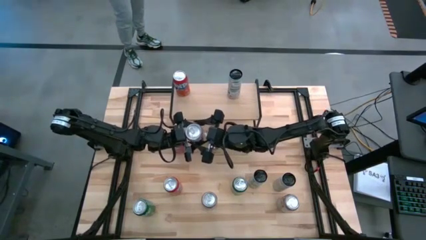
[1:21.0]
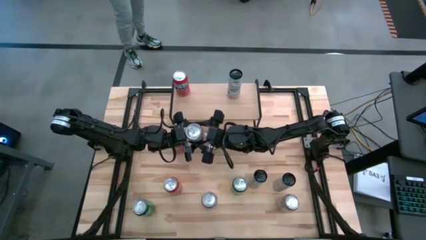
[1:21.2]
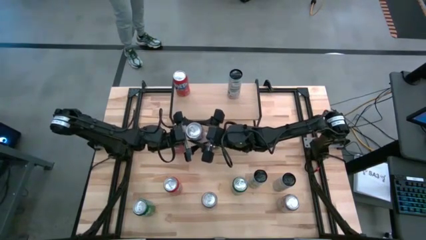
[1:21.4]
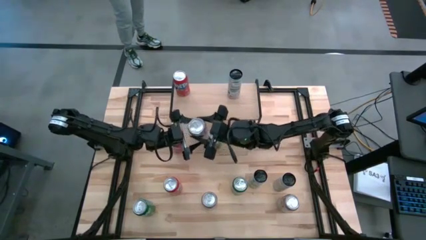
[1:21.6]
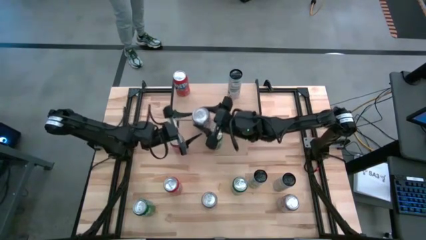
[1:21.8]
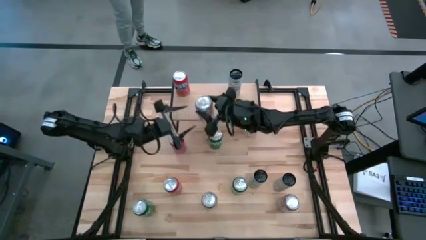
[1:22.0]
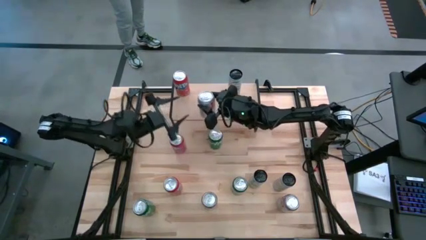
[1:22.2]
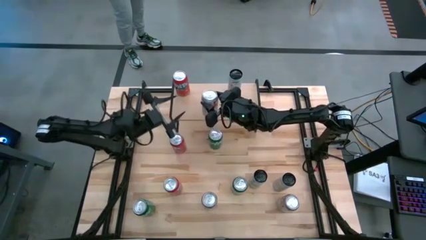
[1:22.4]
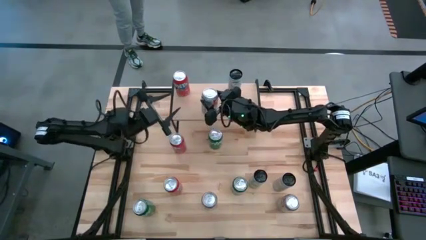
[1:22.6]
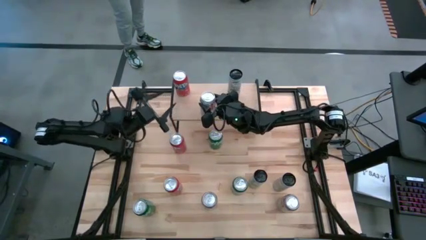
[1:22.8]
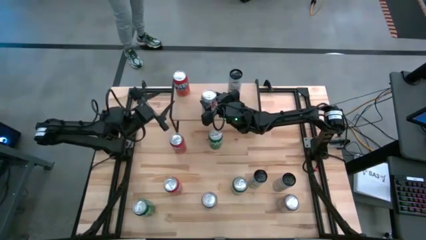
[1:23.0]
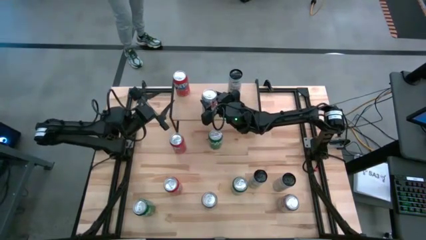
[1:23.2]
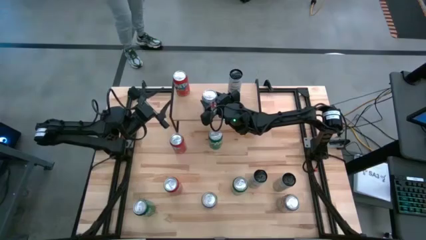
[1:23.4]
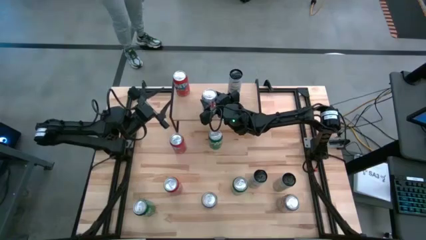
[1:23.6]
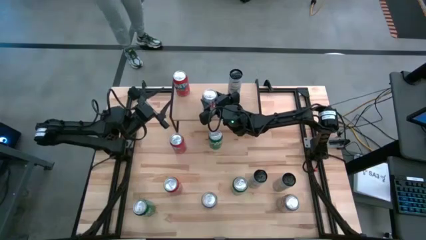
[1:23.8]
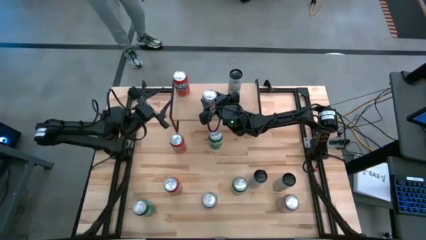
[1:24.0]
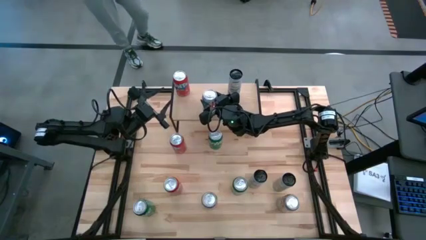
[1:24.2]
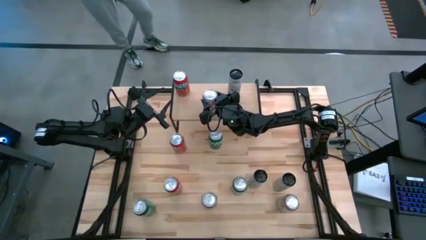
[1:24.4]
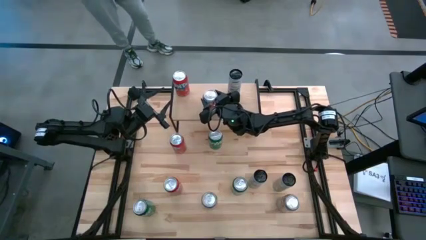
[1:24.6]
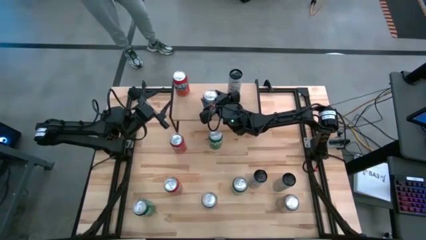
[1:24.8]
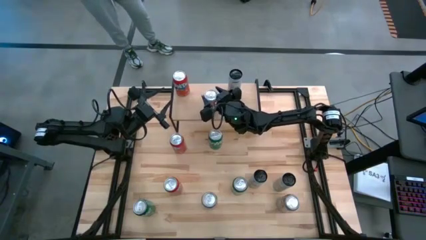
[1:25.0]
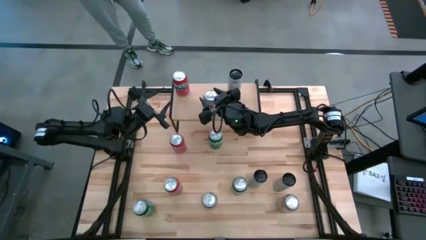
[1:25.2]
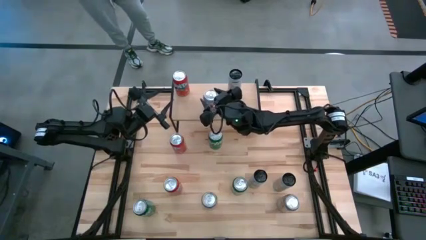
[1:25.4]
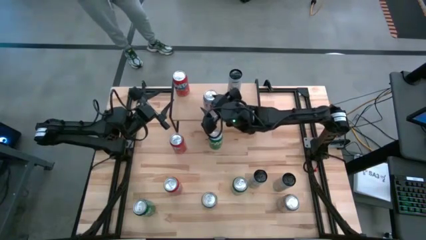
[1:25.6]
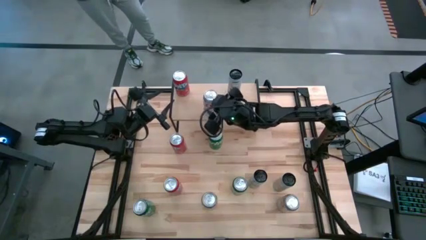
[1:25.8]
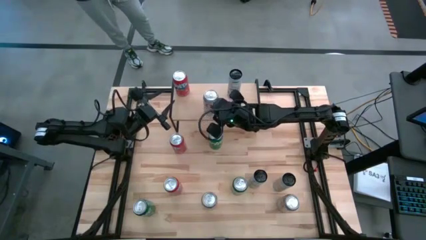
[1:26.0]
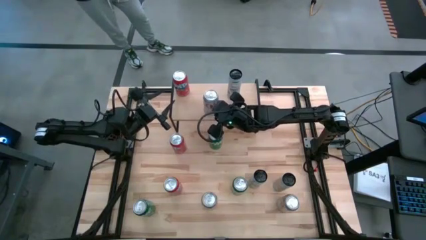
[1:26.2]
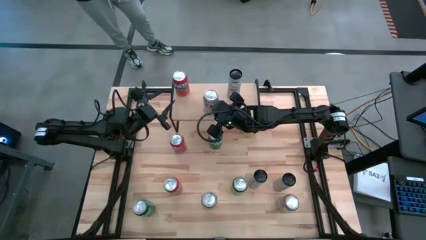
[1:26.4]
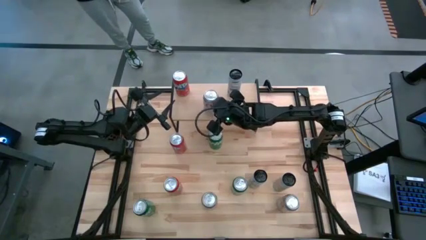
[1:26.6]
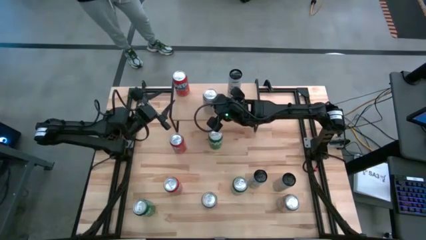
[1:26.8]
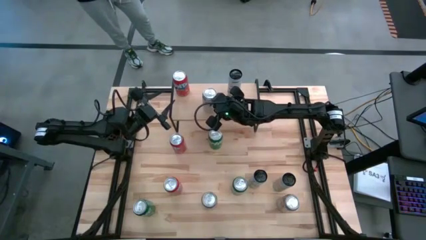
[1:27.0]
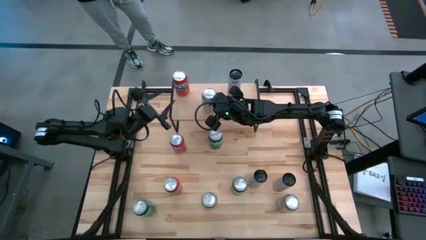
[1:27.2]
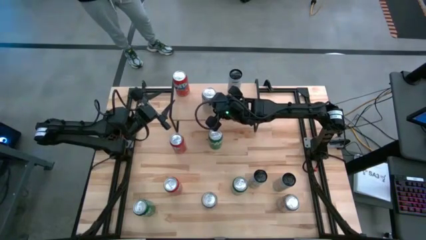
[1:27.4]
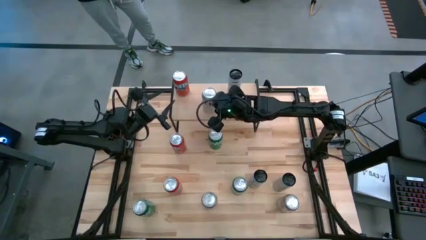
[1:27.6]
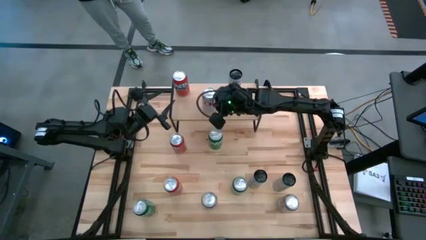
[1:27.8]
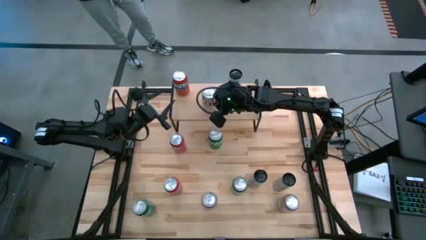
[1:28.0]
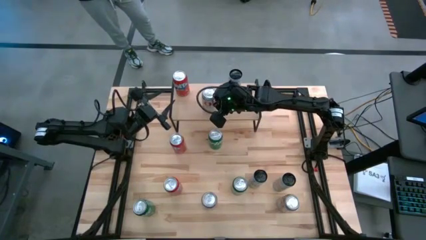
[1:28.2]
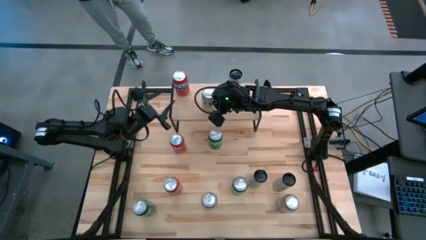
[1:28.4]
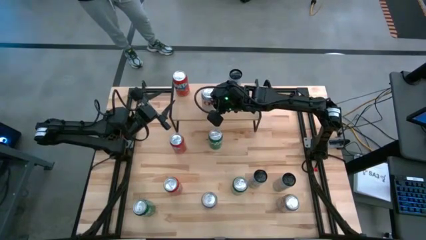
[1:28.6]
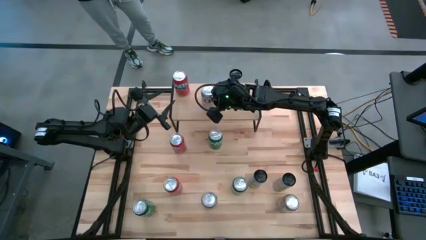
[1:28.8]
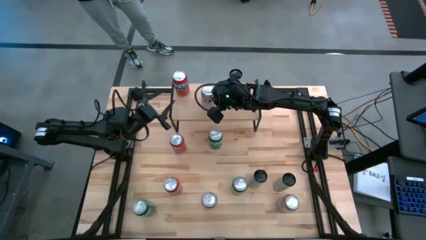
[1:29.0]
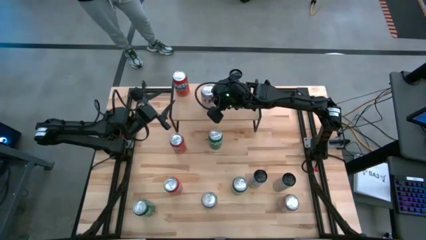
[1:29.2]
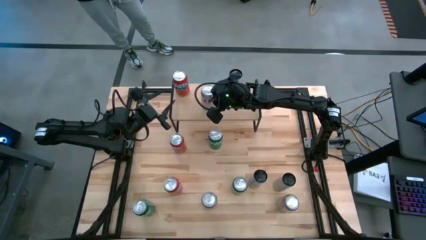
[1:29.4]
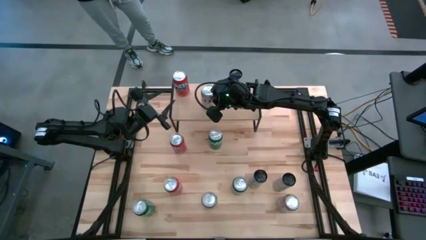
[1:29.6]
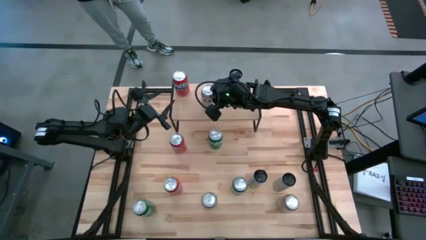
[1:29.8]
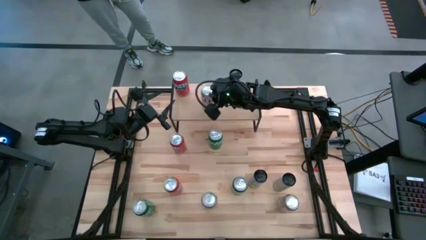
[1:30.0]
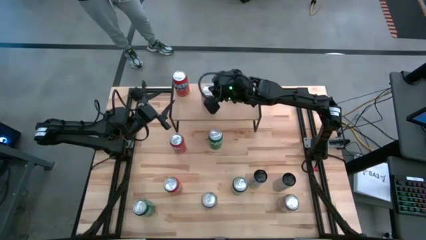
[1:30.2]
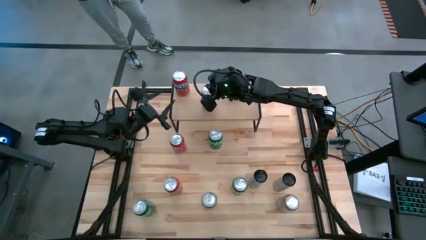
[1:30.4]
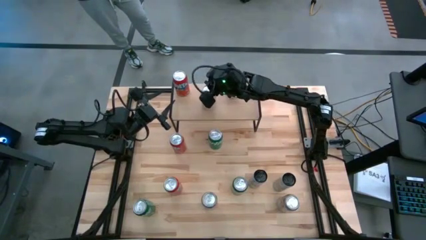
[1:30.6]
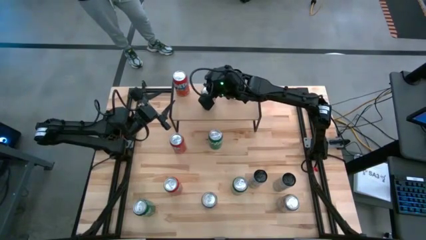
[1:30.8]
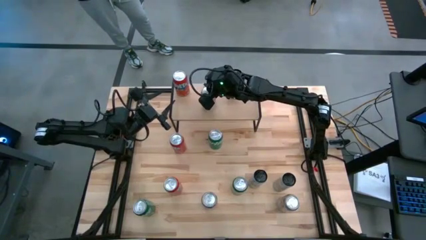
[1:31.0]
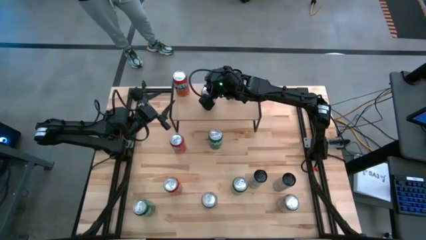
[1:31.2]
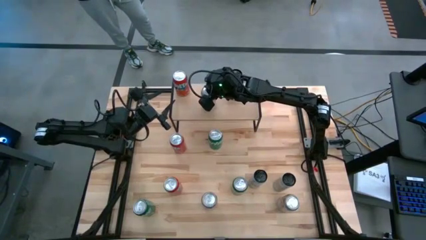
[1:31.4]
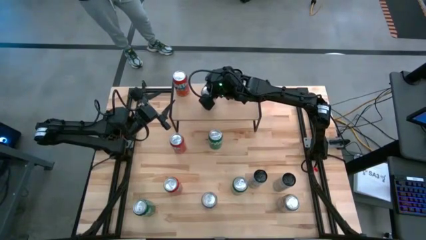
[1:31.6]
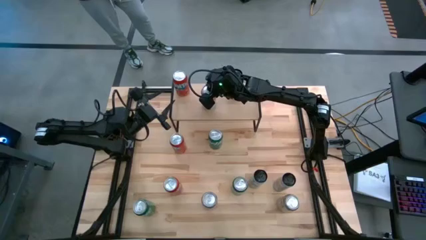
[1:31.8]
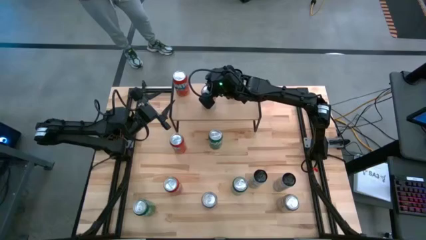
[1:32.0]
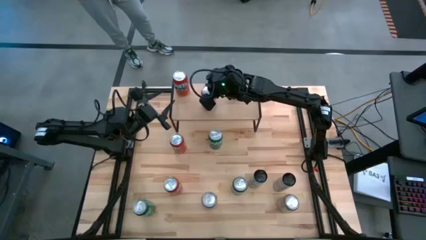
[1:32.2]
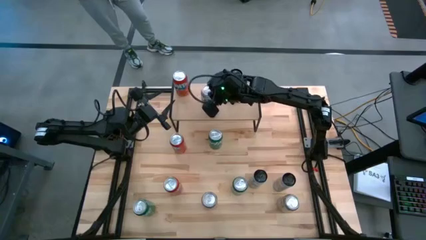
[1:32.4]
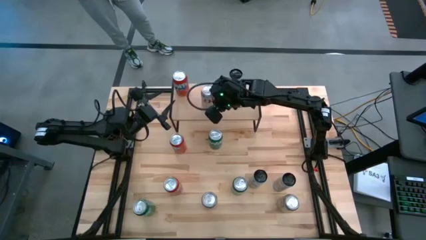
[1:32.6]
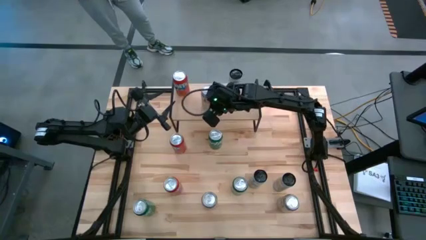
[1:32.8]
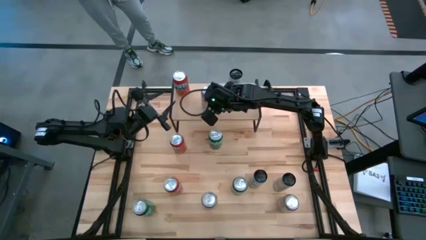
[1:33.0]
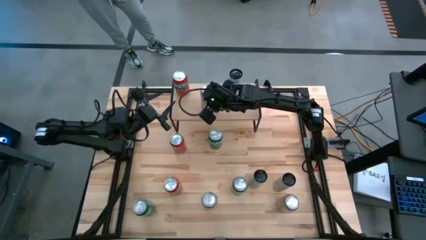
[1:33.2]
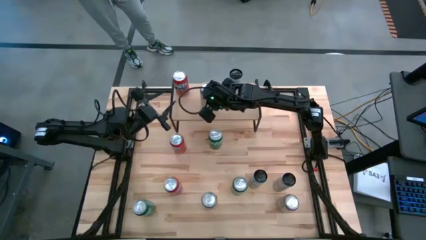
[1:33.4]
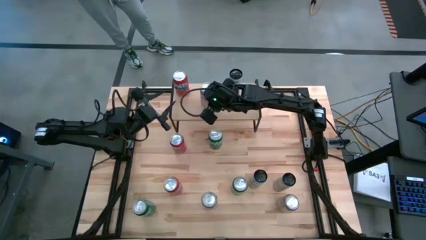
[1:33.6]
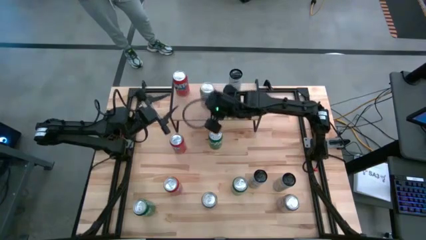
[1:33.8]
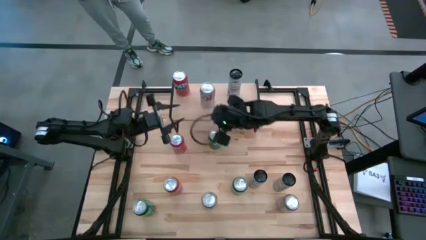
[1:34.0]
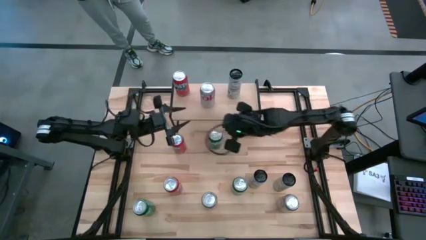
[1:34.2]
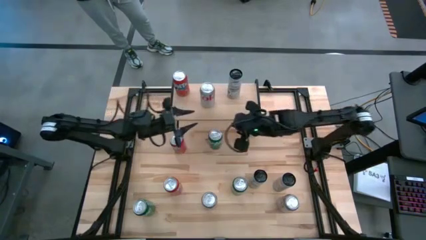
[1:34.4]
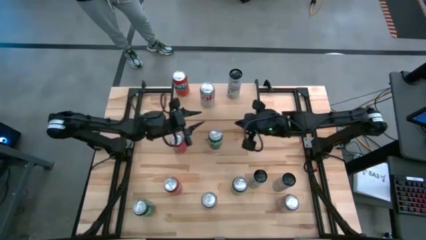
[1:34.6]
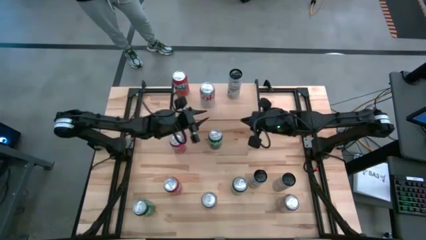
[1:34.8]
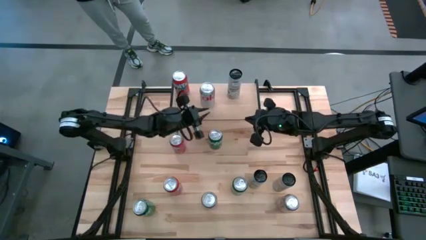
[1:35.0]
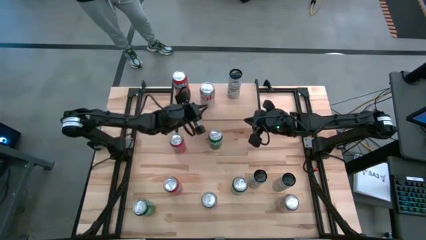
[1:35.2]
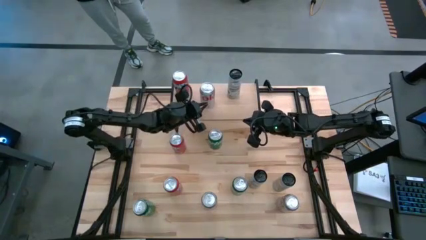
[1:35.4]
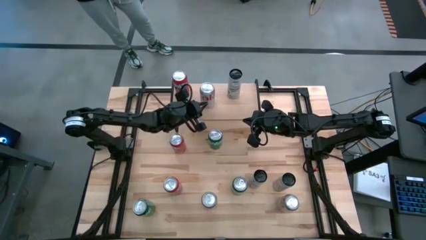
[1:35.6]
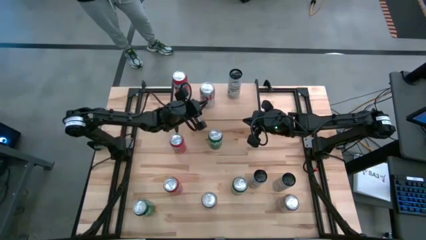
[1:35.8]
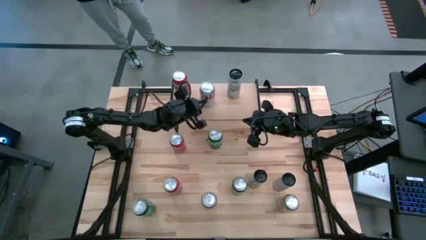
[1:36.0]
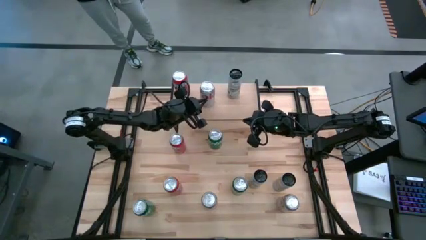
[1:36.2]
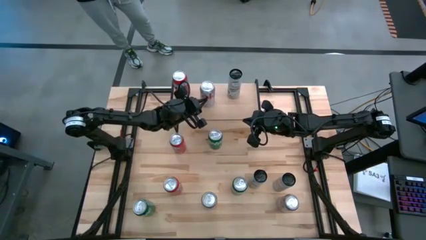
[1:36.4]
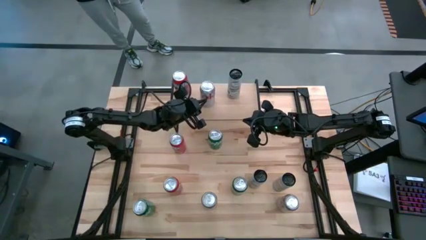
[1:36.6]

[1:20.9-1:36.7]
Task: Place canned beverage on shelf
Put the silver soda can on the shelf
